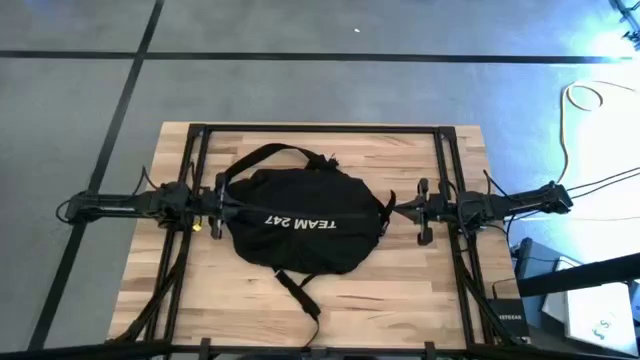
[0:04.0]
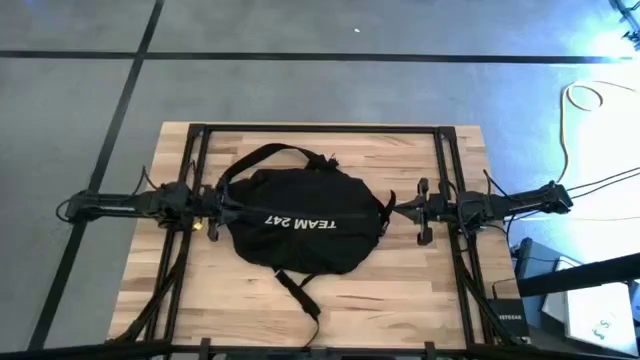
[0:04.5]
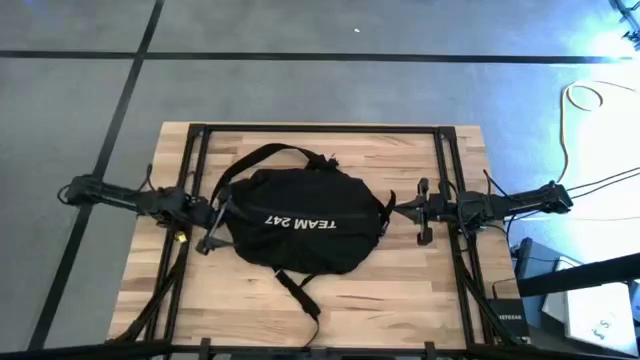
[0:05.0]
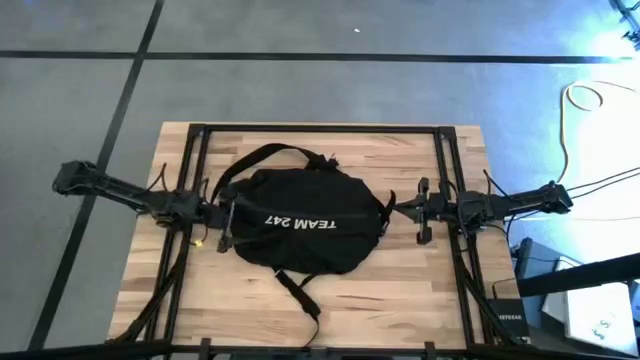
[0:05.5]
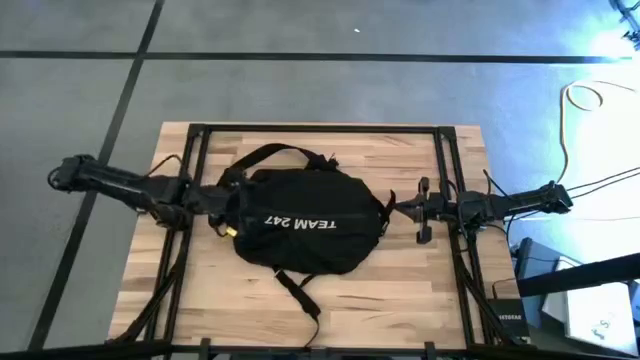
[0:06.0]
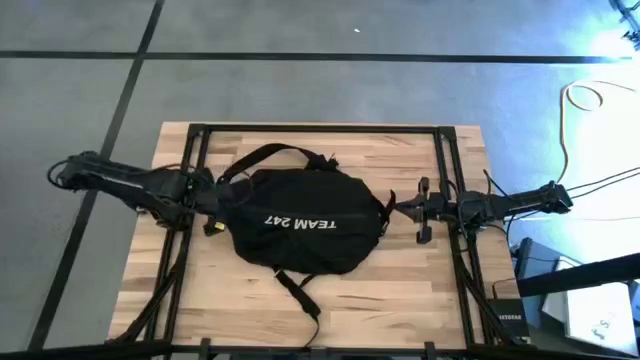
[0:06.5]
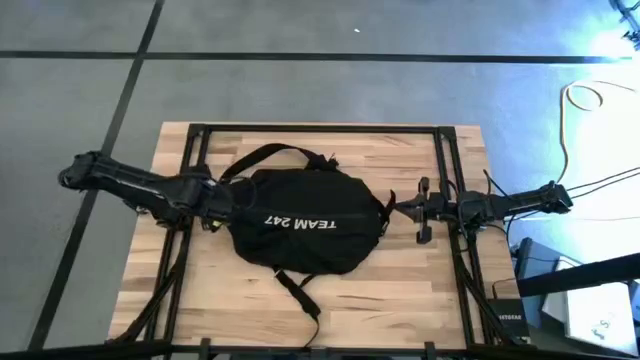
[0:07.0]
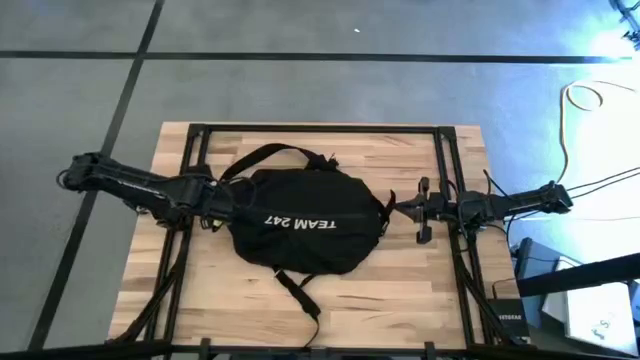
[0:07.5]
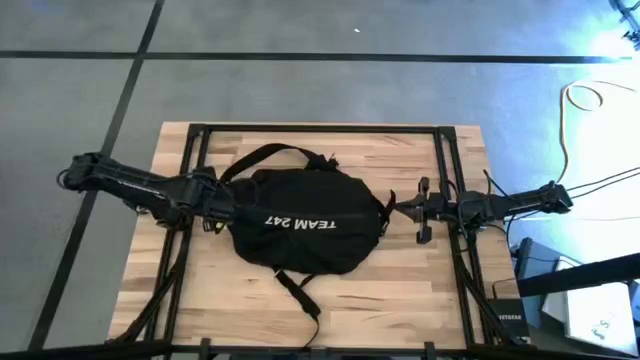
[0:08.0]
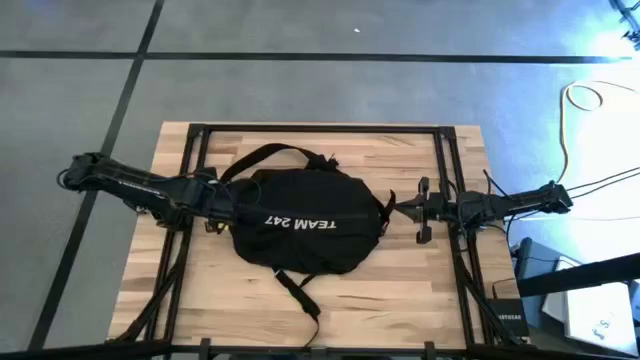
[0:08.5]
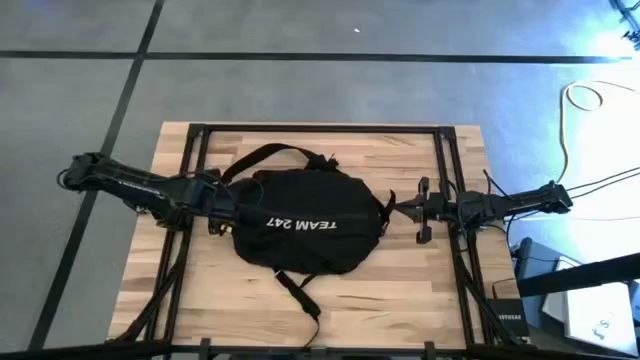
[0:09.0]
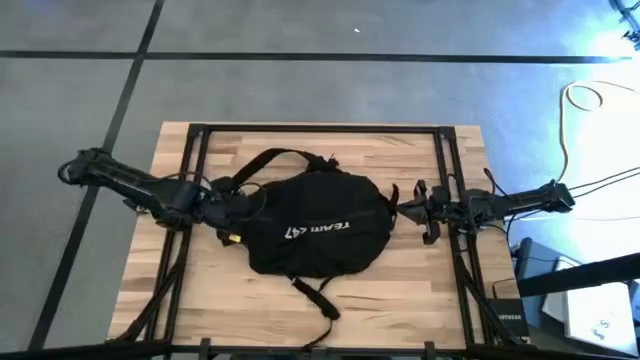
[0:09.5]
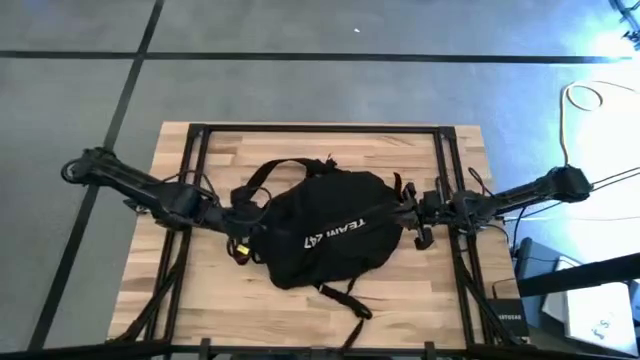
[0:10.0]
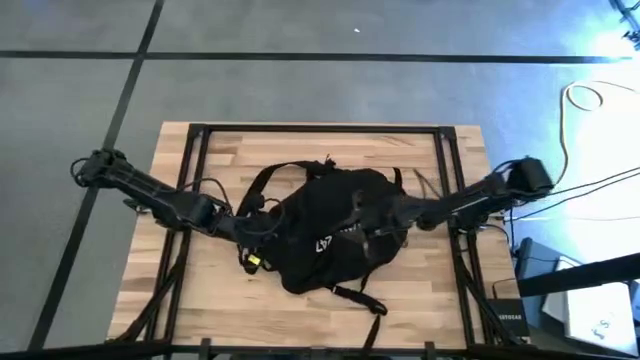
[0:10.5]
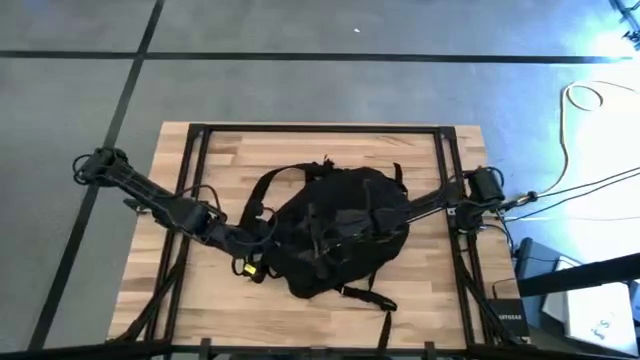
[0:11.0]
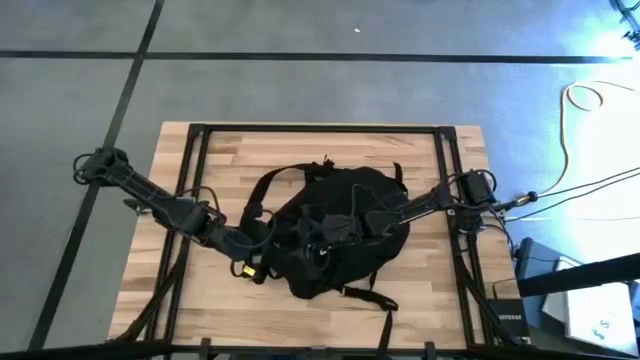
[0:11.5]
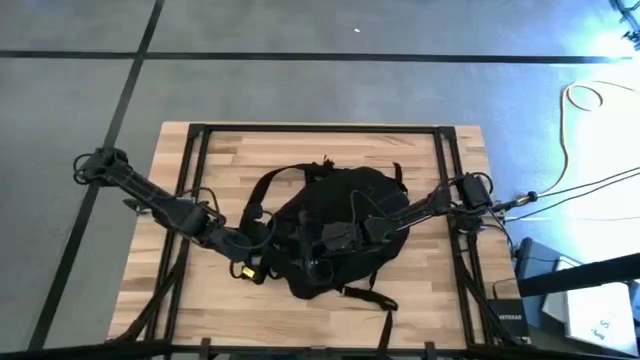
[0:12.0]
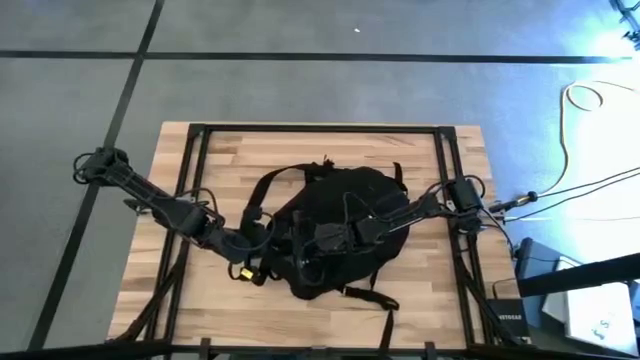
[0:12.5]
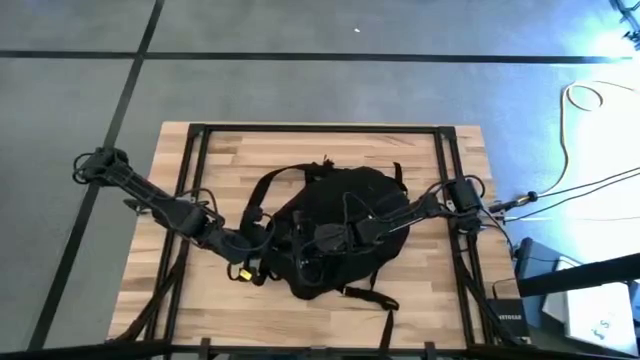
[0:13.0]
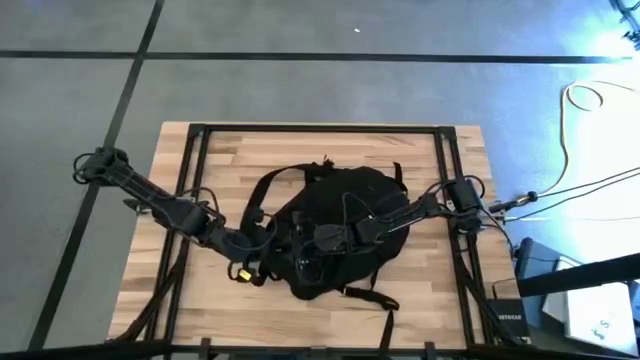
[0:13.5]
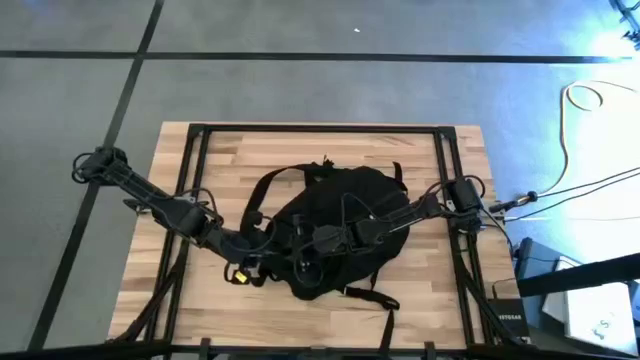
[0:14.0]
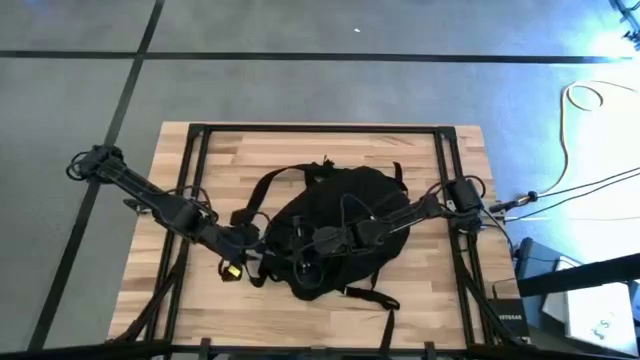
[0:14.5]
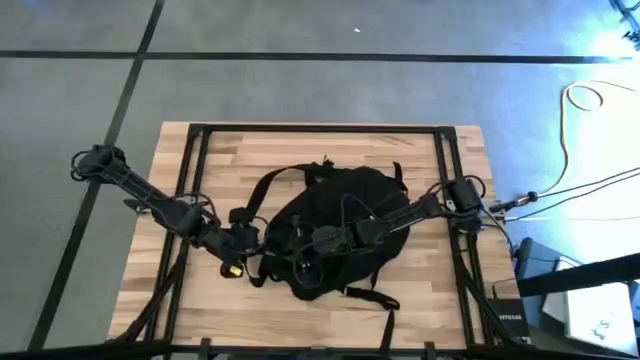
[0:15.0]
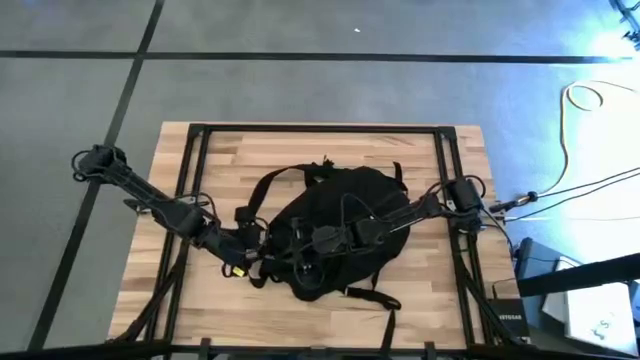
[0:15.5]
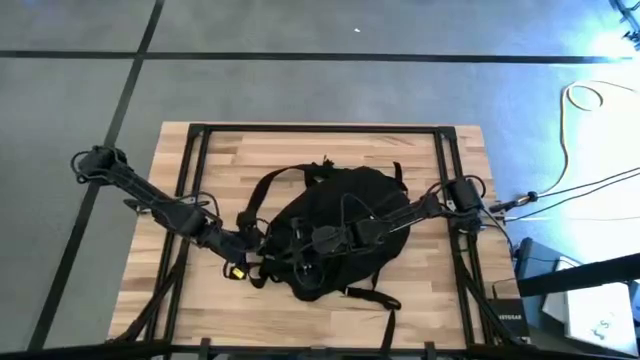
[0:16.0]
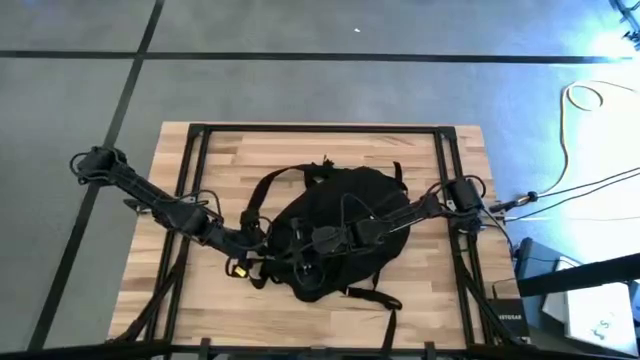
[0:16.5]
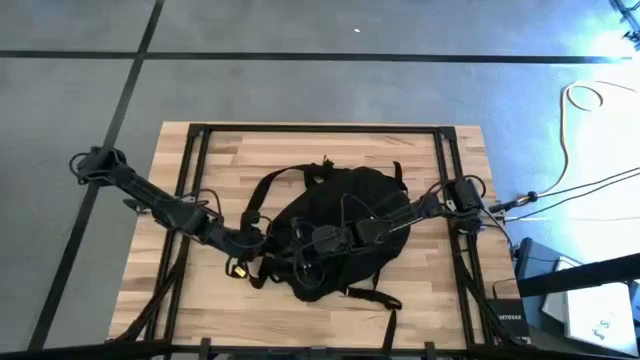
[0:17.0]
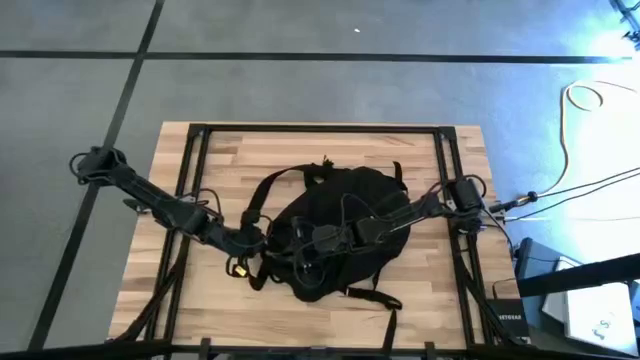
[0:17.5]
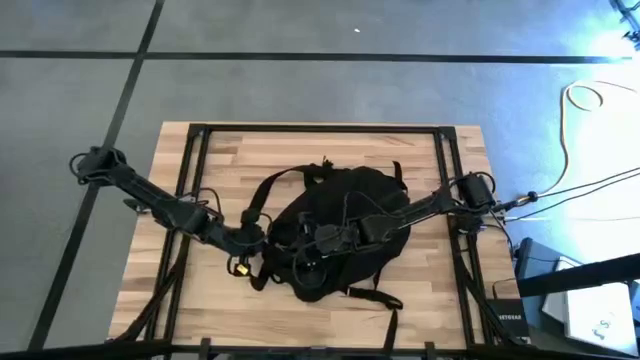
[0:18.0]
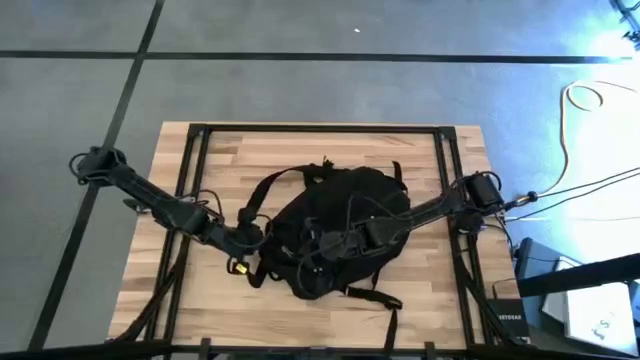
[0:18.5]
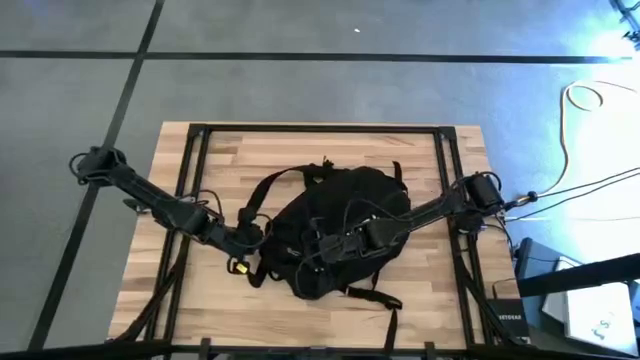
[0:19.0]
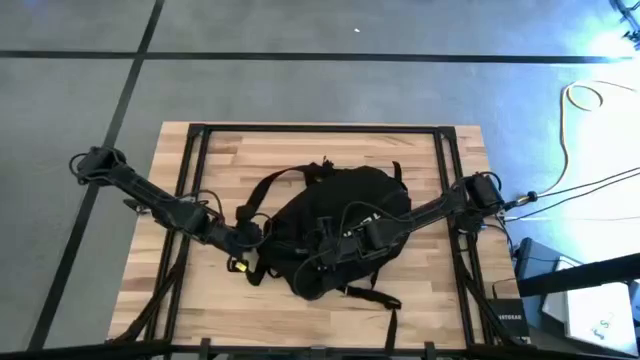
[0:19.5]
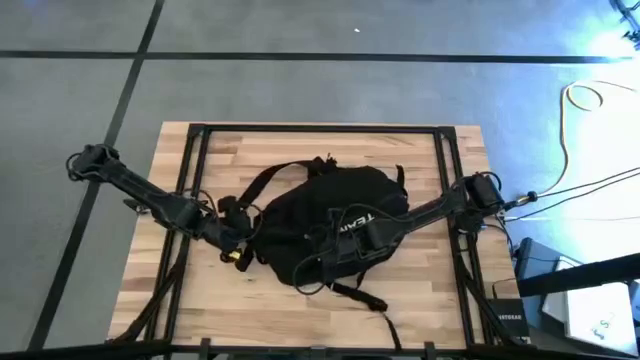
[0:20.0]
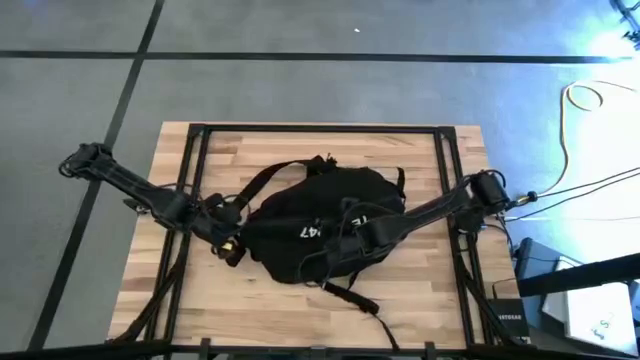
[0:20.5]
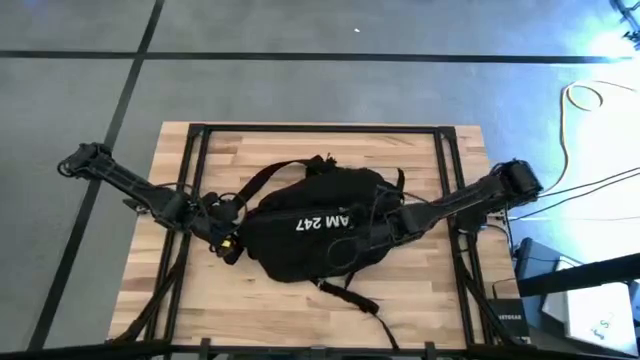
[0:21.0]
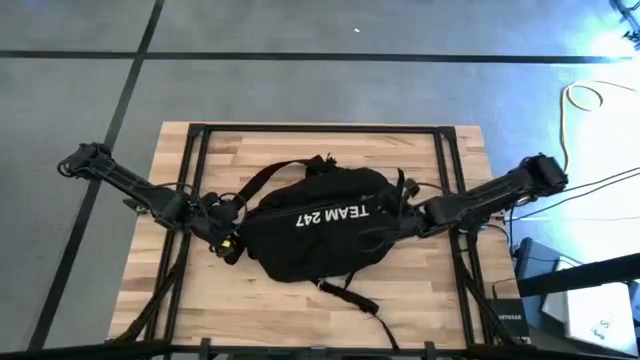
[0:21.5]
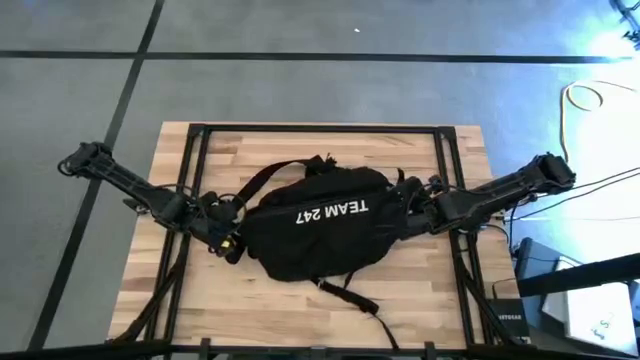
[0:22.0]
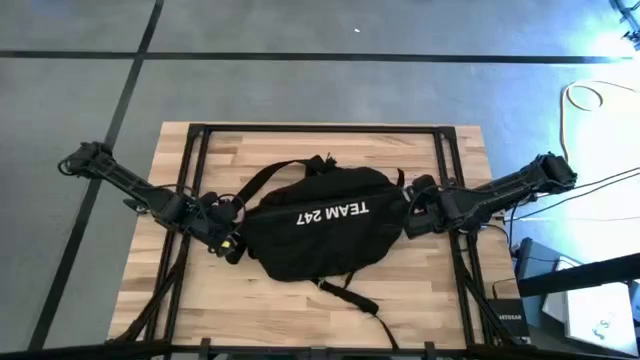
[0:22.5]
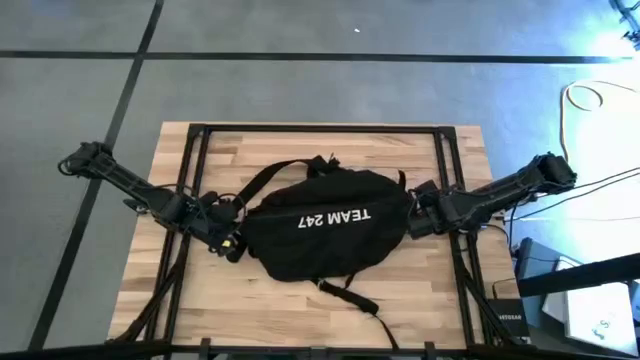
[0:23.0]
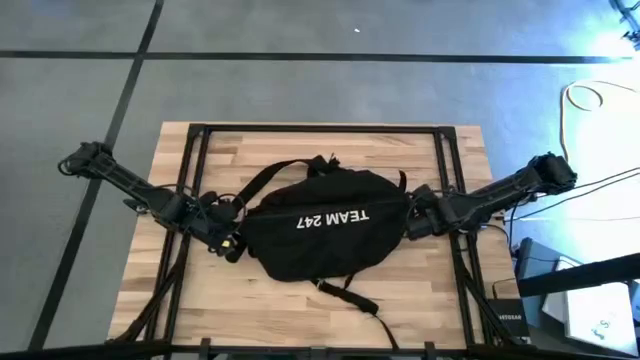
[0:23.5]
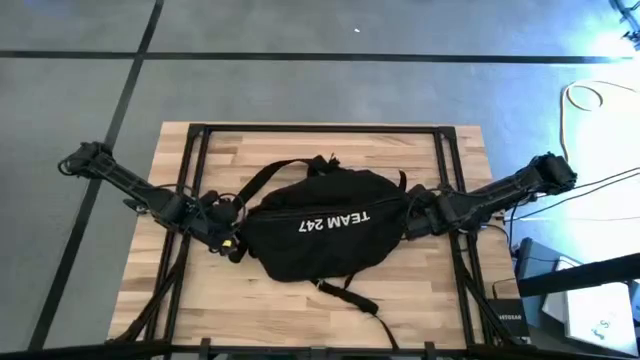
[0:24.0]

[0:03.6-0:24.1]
Task: Unpack backpack
Open the black bag
